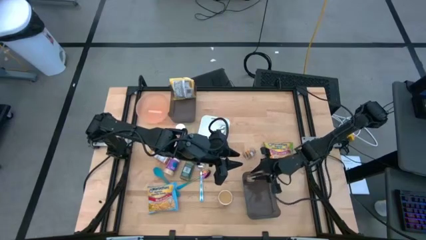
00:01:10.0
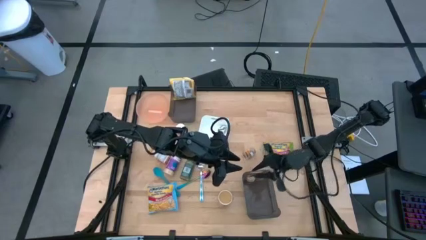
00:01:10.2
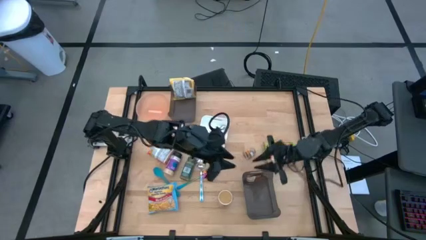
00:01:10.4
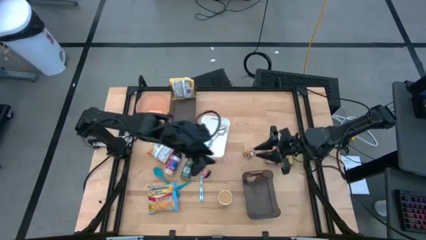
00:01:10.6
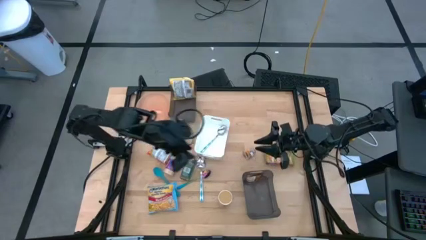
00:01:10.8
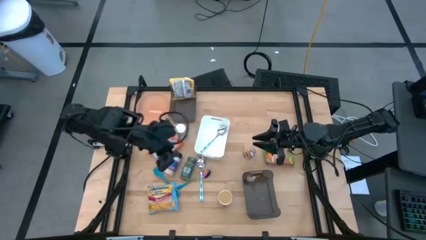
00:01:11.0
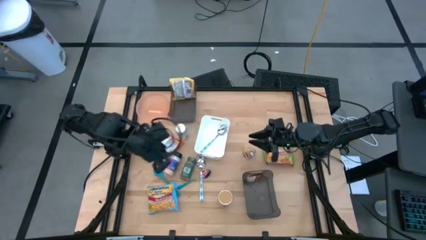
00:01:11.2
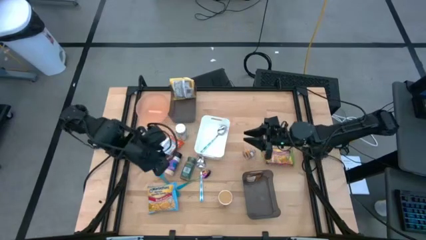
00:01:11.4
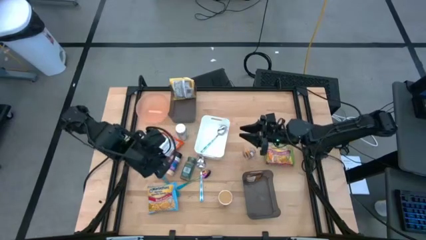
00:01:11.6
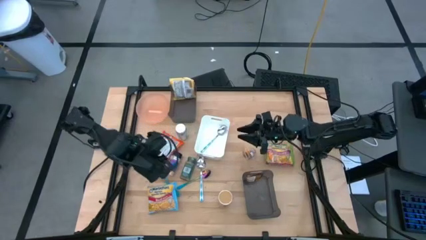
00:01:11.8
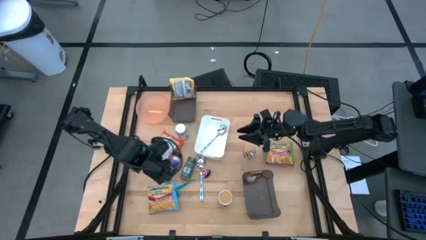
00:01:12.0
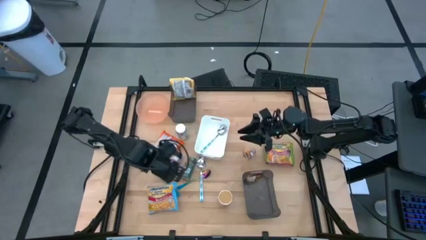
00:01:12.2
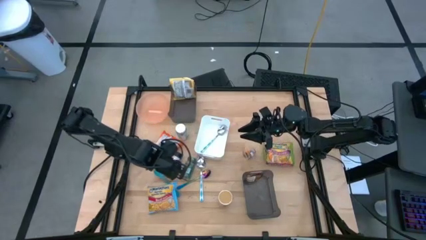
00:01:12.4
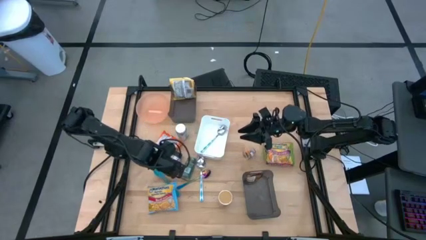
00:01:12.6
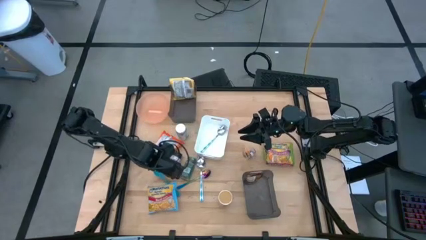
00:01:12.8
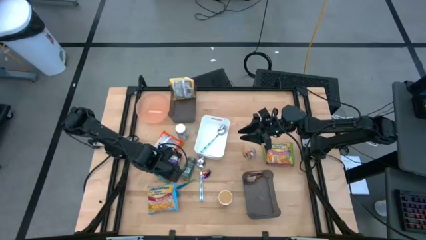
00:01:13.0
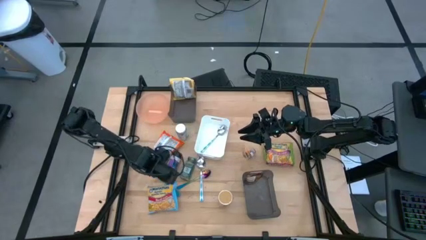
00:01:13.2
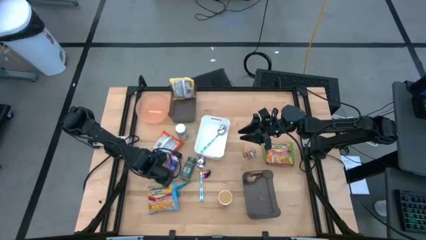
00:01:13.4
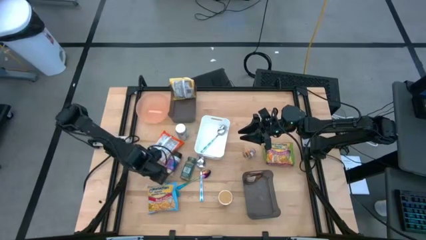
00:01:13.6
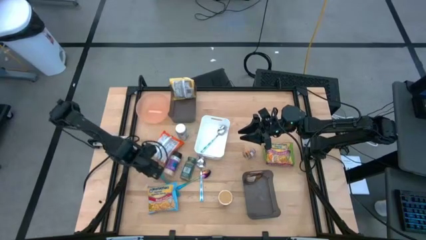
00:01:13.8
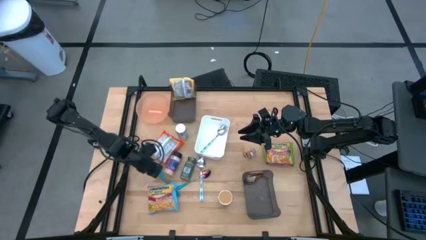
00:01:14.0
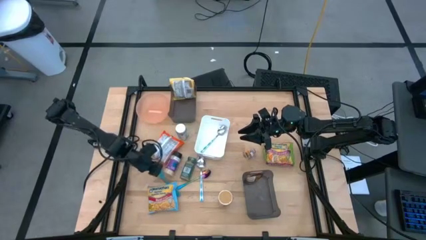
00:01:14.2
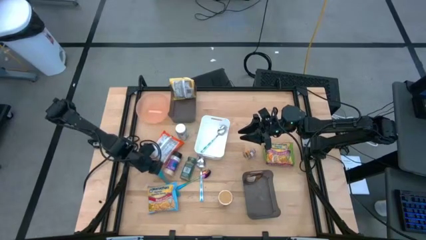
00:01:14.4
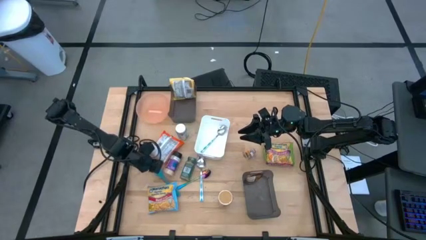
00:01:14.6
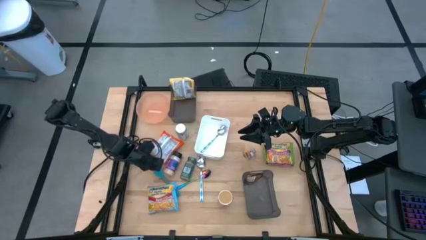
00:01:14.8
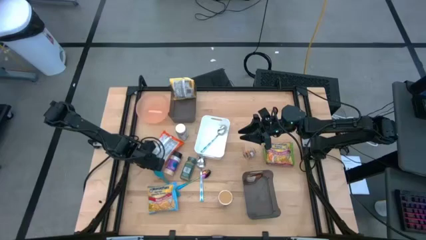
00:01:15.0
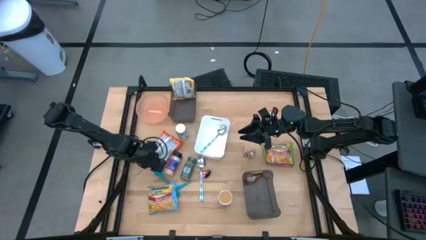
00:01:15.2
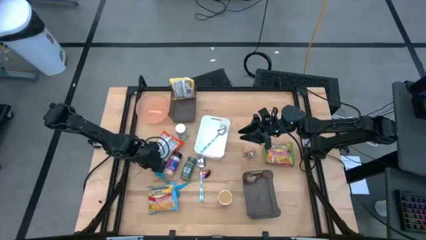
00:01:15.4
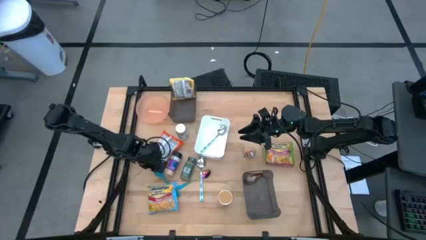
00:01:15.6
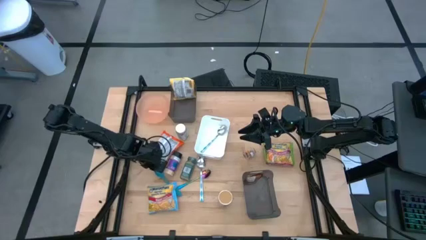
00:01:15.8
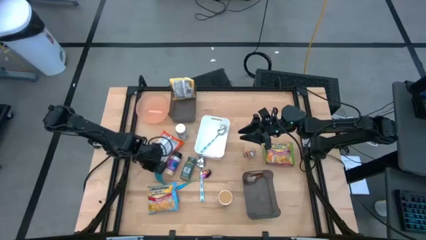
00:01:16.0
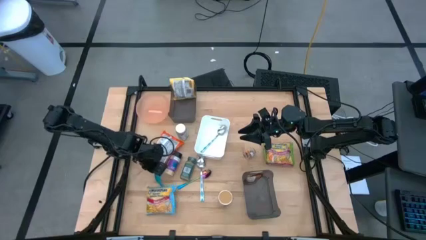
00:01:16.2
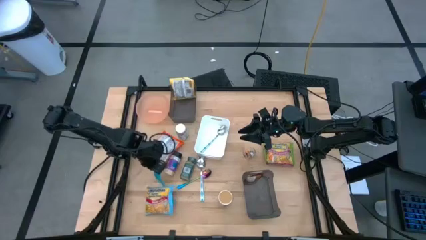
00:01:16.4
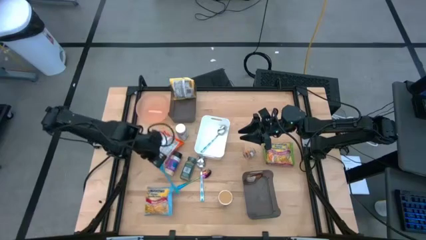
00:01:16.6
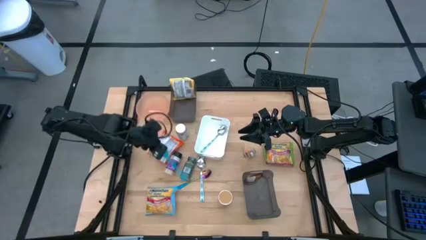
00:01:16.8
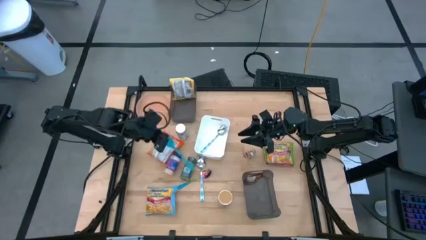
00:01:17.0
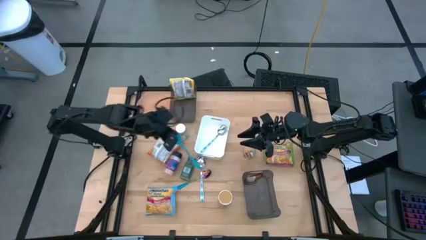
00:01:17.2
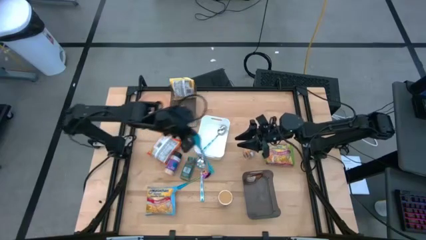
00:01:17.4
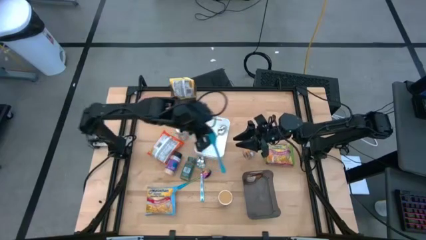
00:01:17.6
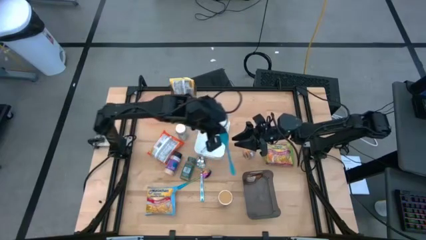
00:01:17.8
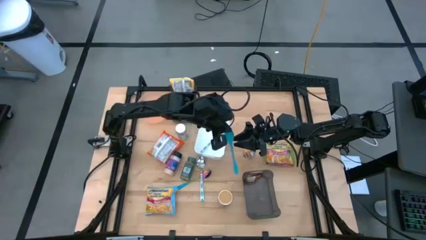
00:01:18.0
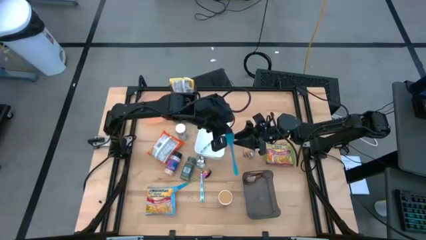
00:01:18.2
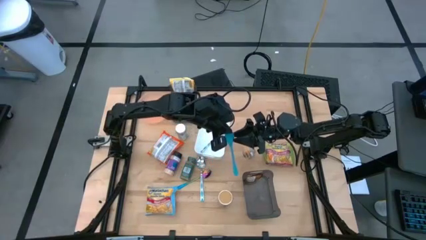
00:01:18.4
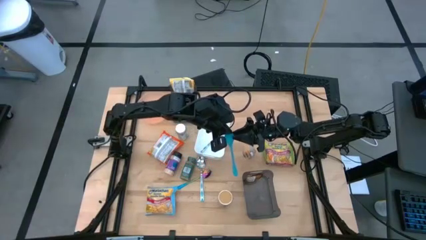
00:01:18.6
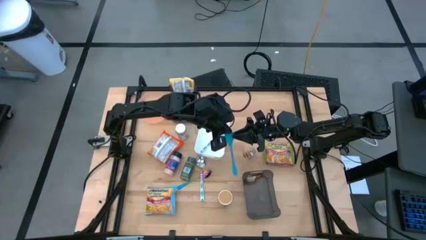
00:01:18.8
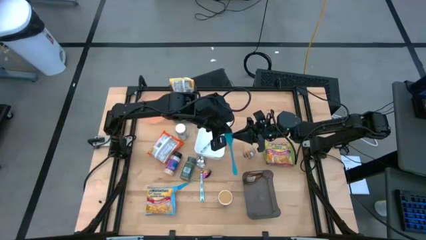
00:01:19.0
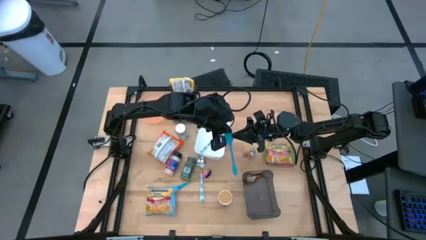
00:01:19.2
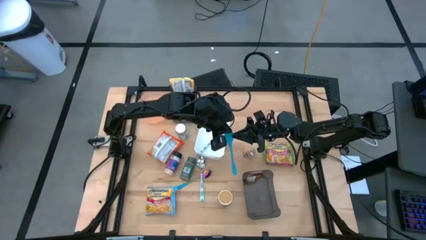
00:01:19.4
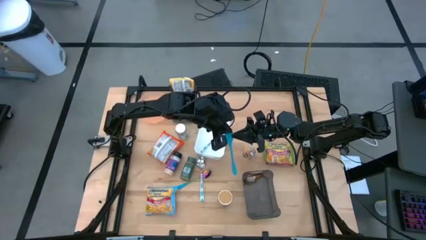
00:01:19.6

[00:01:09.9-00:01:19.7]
Task: Pick & Place Food Item
Put the blue baby spoon into the white bin

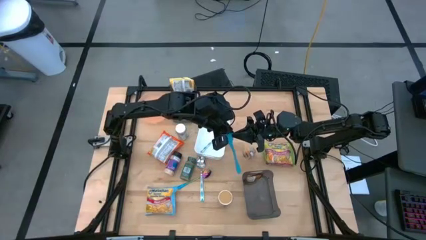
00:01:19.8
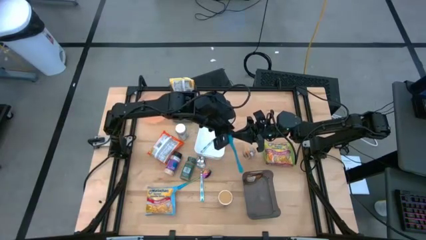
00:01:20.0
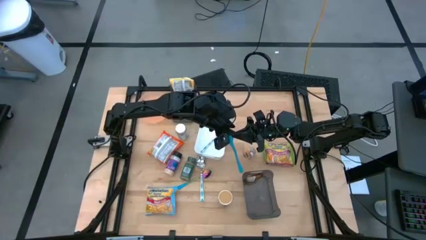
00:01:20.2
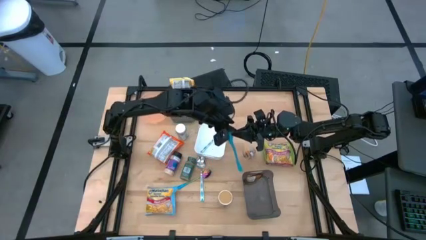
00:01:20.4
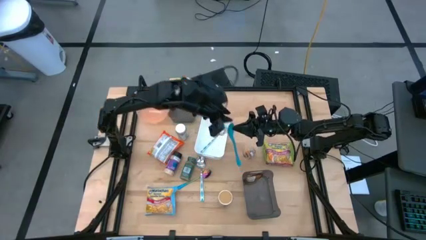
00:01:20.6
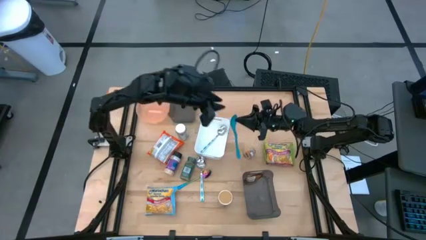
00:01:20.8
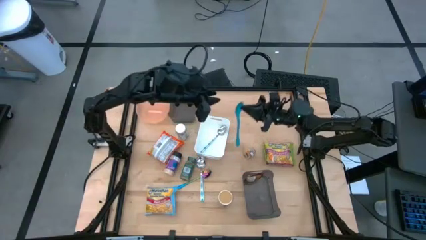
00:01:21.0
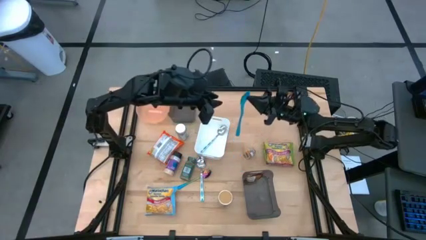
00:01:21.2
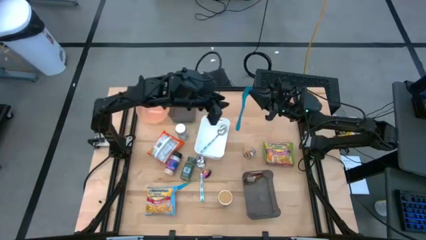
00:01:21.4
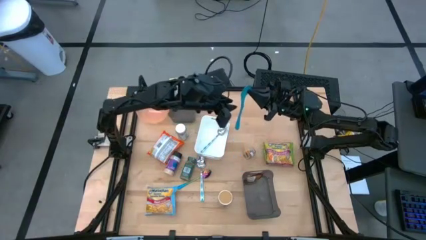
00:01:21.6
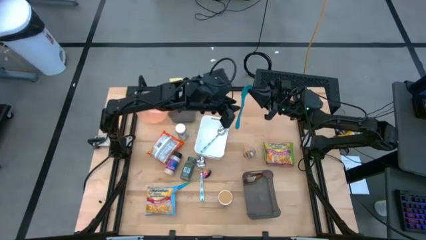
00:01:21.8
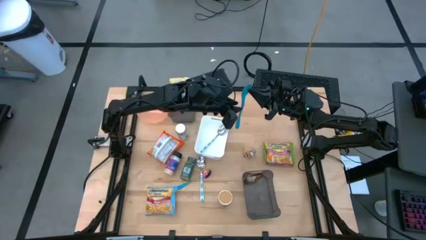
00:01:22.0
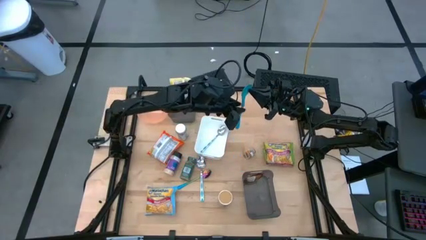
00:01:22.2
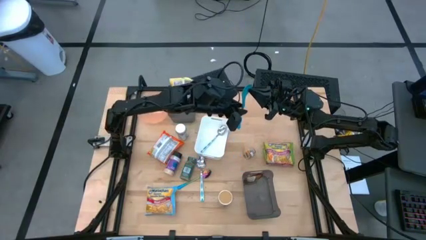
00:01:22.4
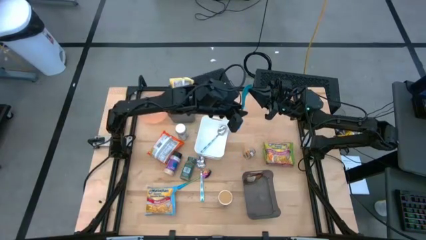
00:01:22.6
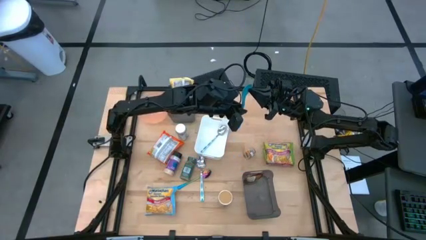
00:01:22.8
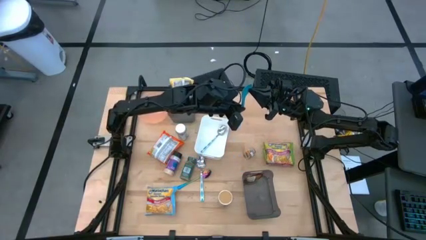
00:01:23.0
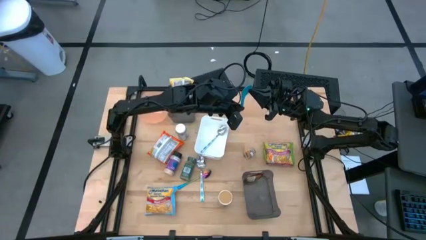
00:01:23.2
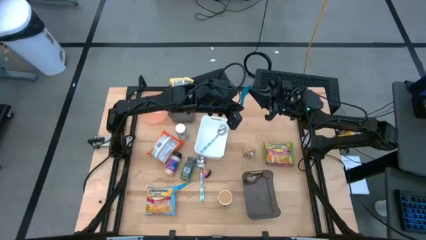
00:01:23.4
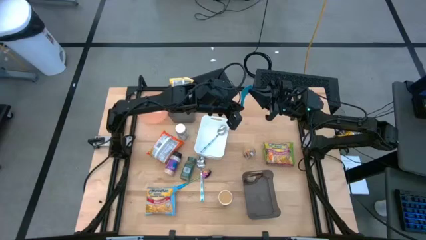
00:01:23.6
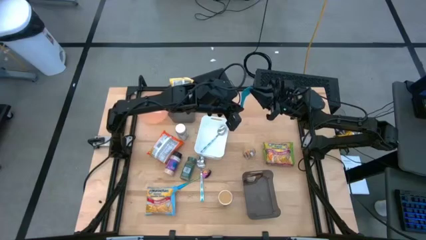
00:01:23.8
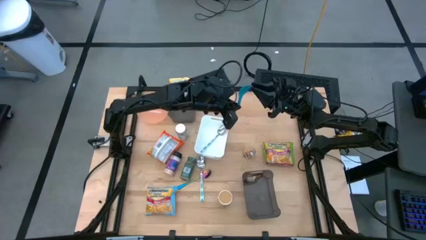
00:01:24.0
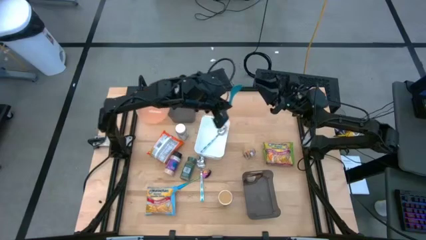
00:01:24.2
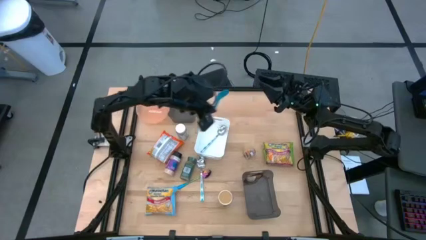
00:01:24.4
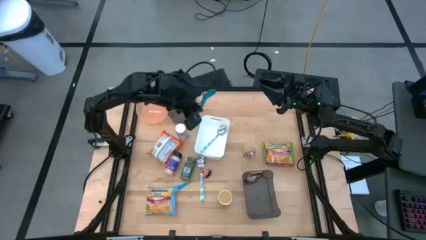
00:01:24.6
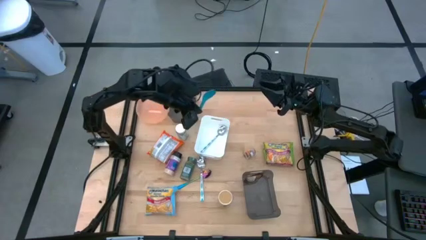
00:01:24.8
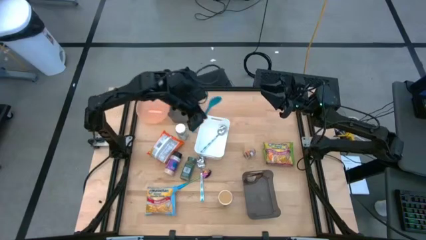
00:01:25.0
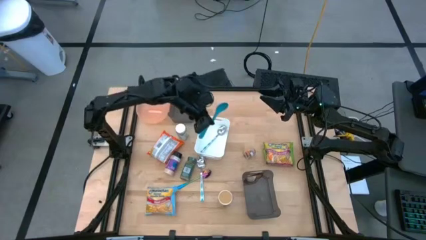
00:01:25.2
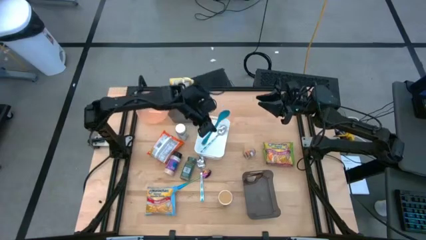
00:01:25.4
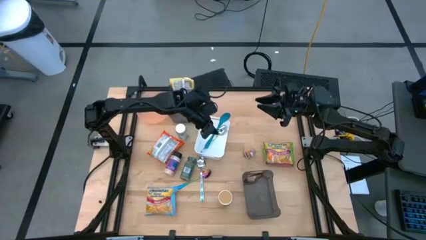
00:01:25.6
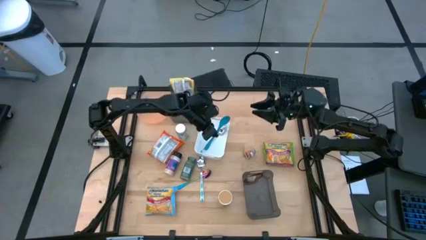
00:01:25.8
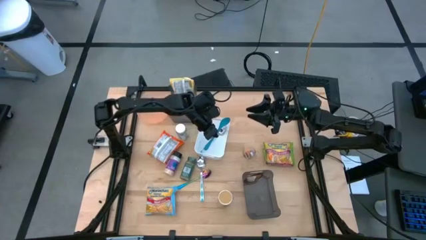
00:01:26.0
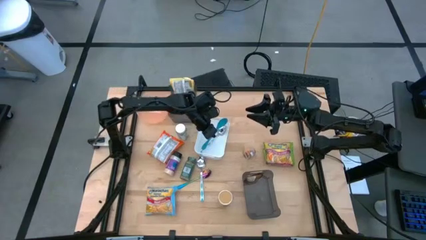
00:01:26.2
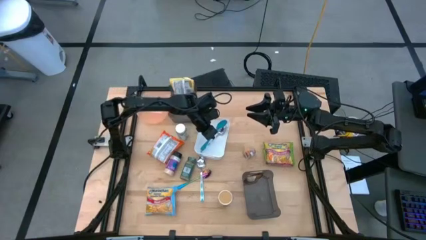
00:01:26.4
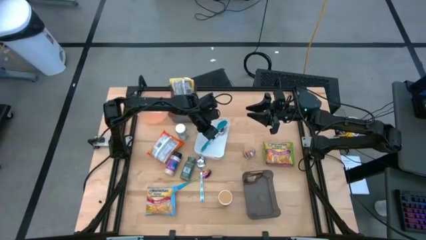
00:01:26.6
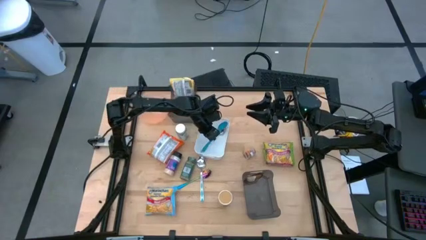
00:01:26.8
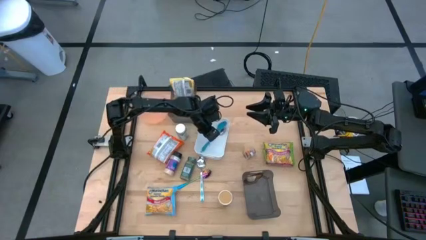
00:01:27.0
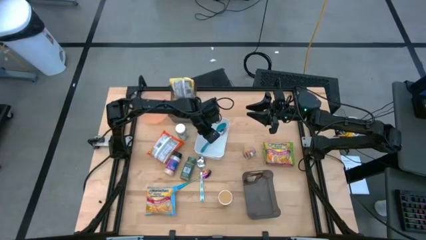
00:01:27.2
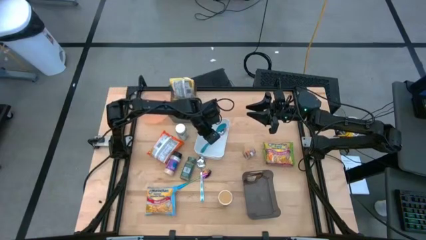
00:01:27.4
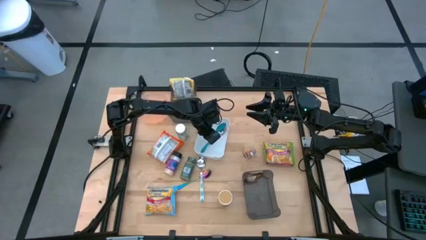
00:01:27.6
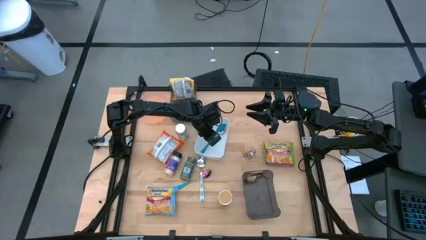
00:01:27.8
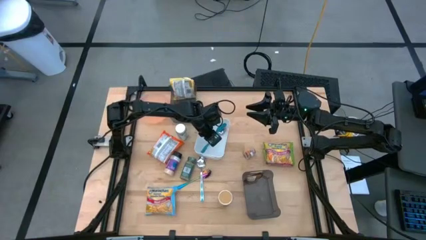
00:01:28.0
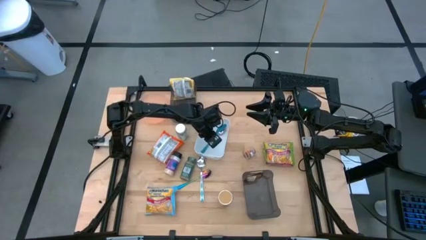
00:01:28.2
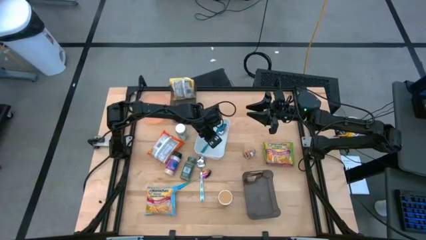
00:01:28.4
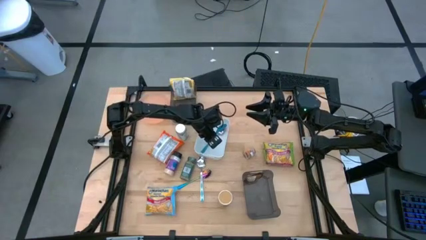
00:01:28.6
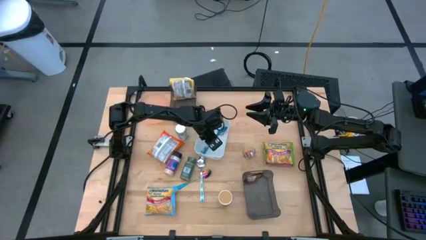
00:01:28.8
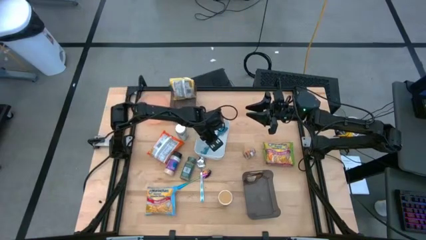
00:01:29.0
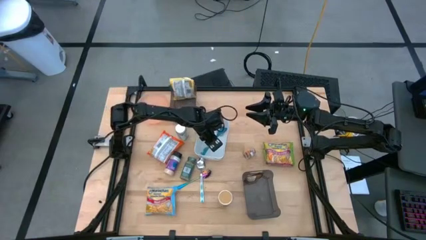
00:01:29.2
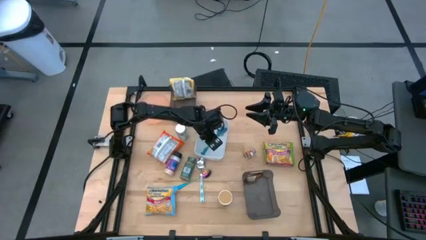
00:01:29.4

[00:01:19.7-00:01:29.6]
Put the blue baby spoon into the white bin
